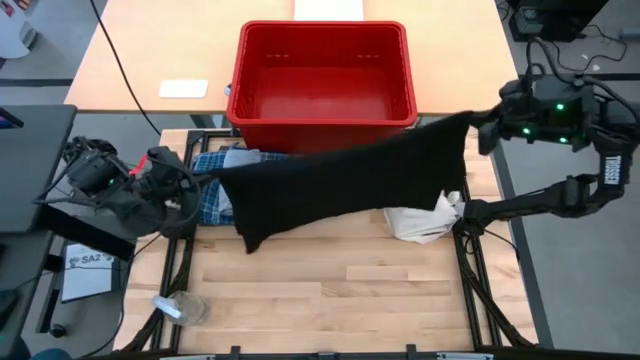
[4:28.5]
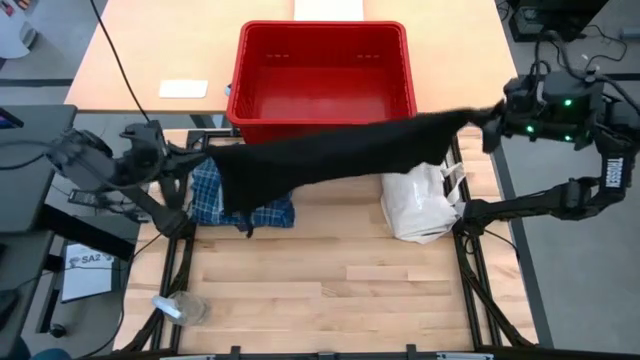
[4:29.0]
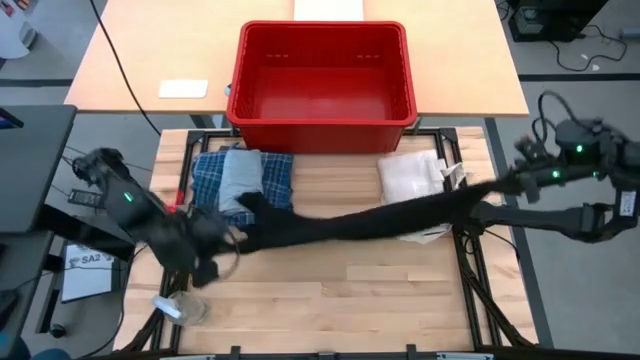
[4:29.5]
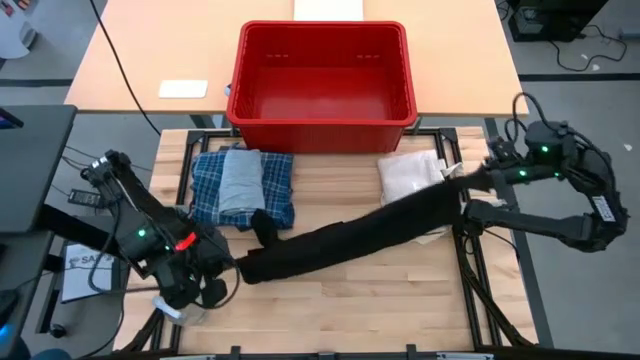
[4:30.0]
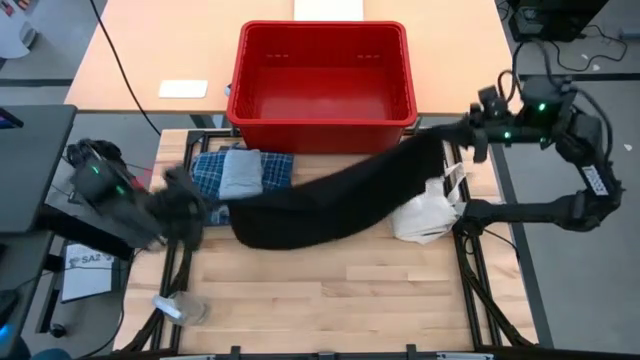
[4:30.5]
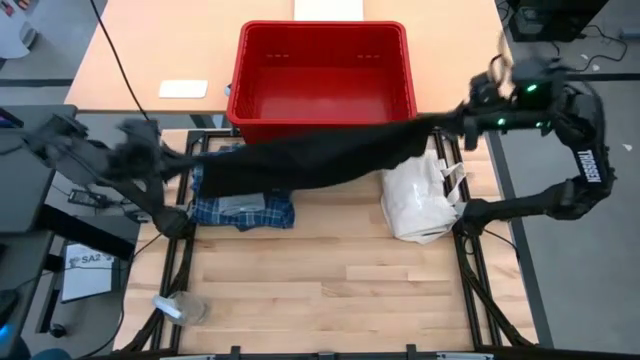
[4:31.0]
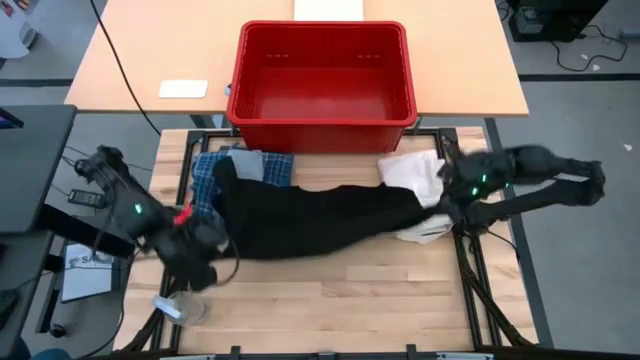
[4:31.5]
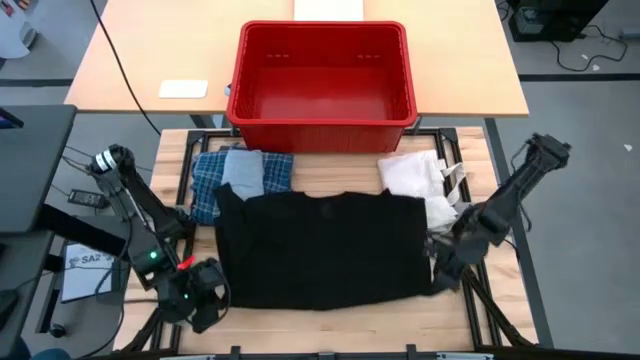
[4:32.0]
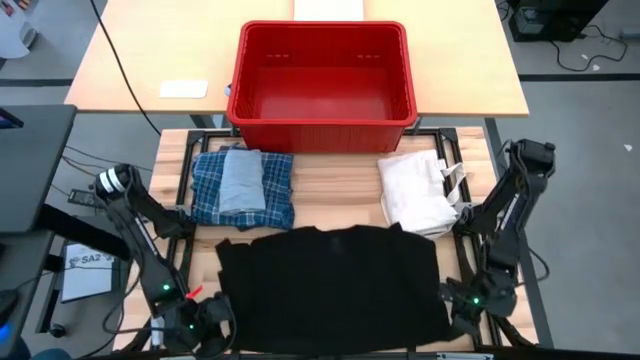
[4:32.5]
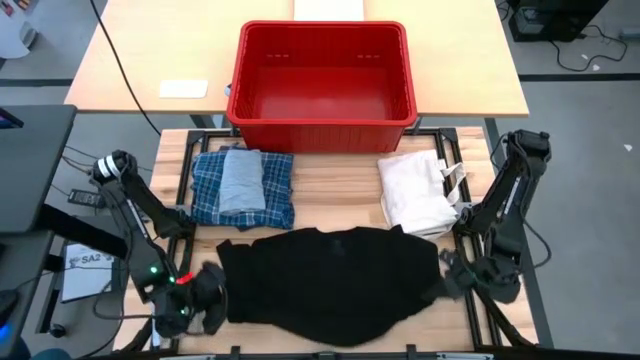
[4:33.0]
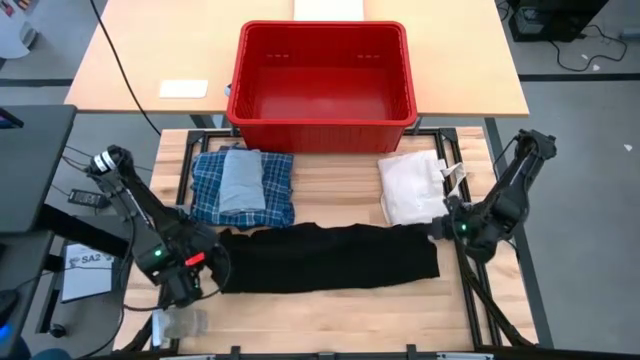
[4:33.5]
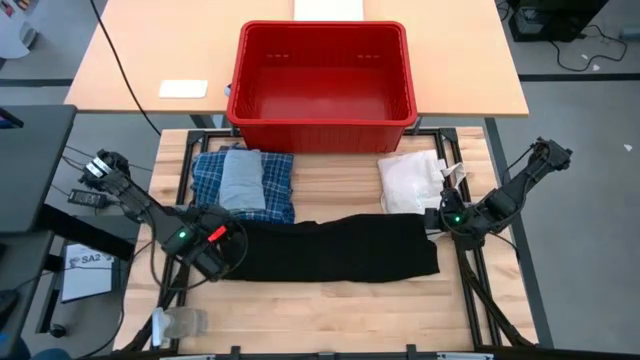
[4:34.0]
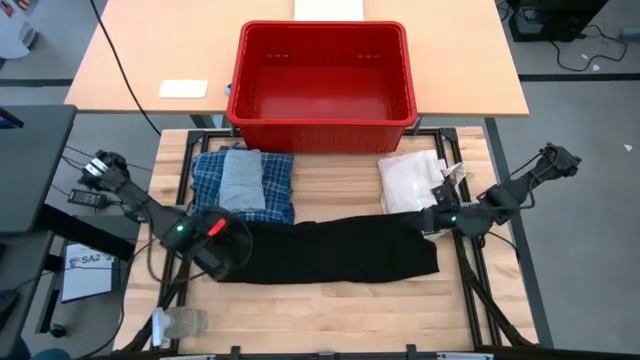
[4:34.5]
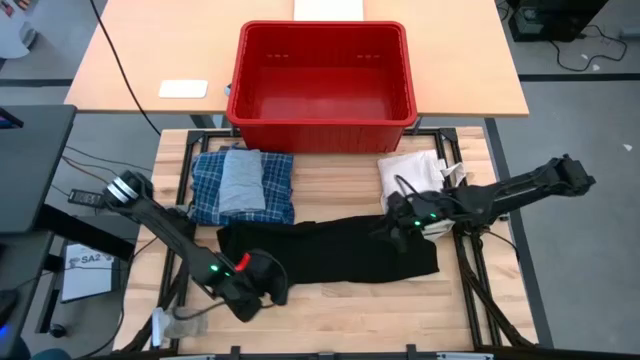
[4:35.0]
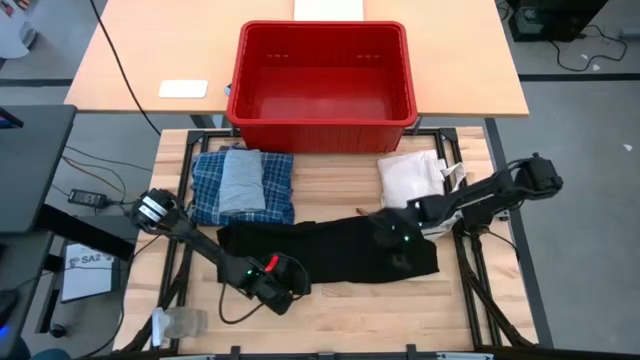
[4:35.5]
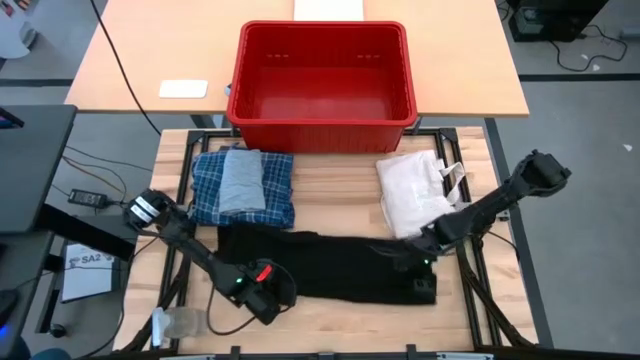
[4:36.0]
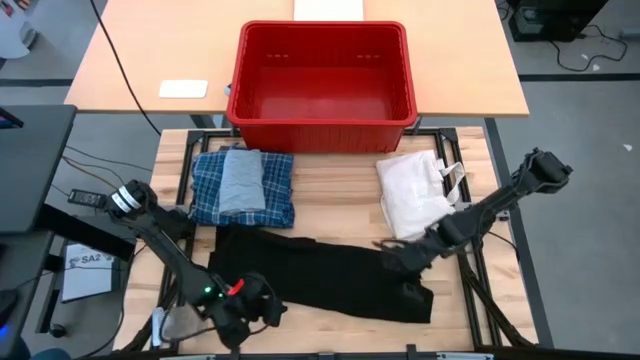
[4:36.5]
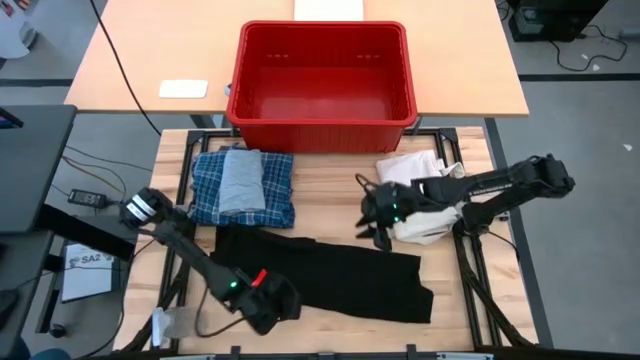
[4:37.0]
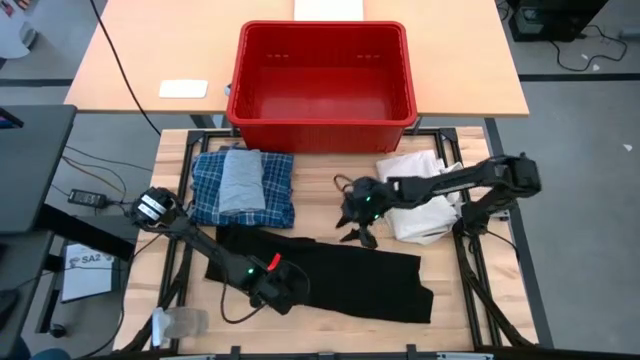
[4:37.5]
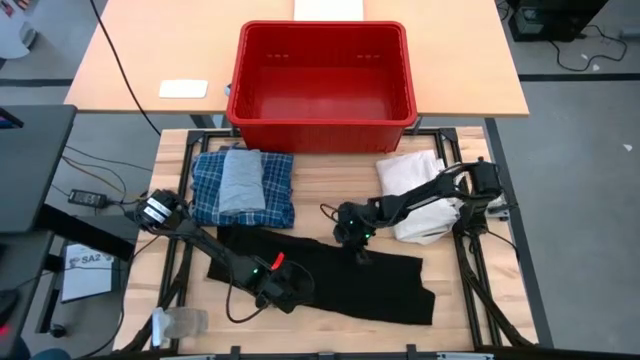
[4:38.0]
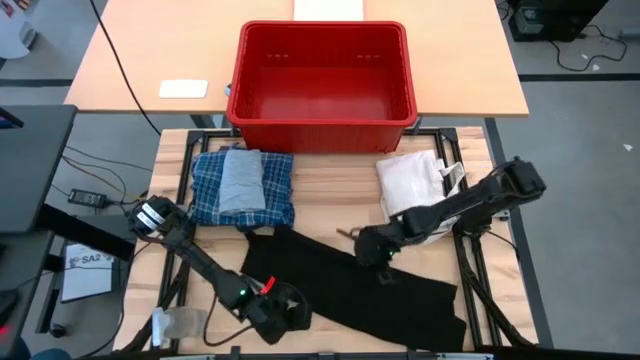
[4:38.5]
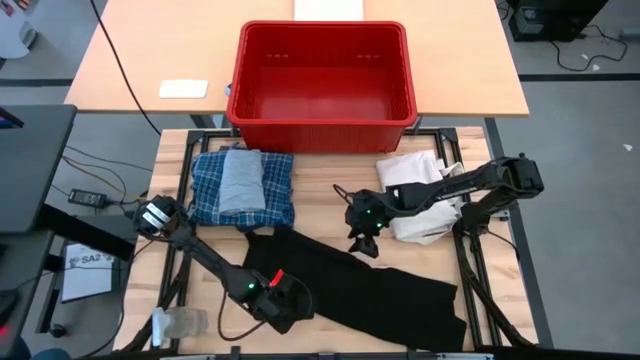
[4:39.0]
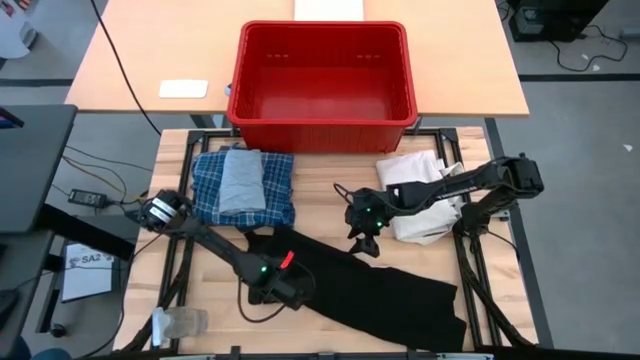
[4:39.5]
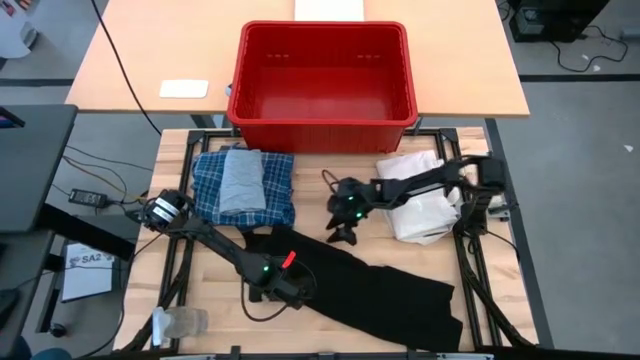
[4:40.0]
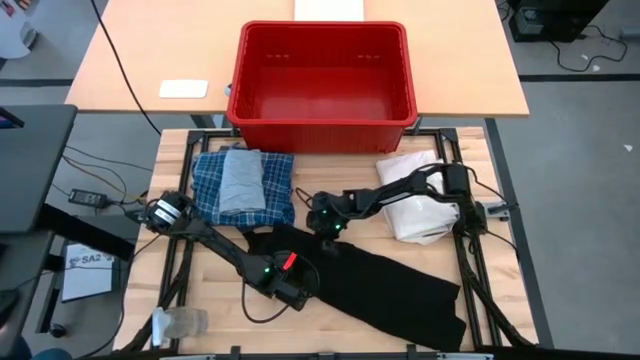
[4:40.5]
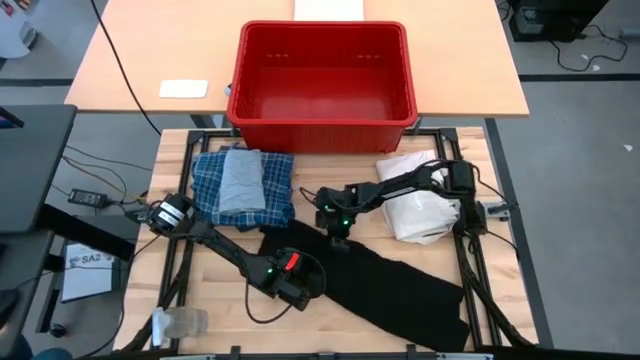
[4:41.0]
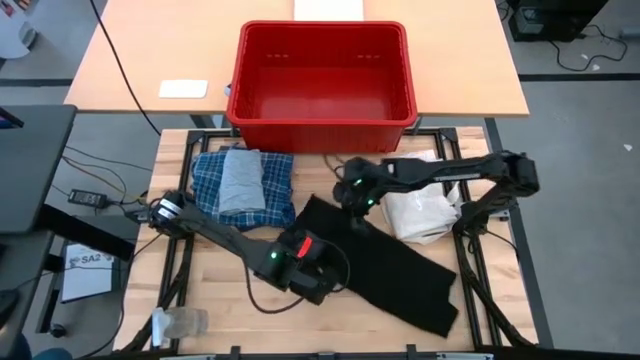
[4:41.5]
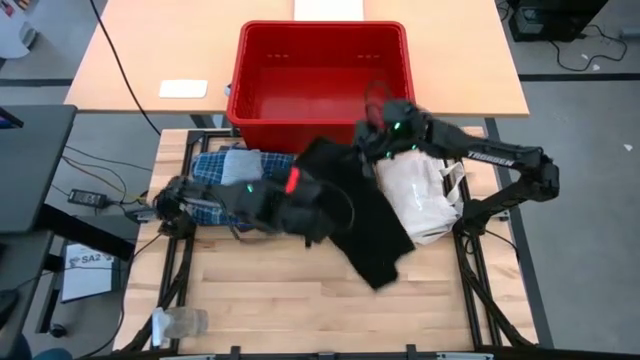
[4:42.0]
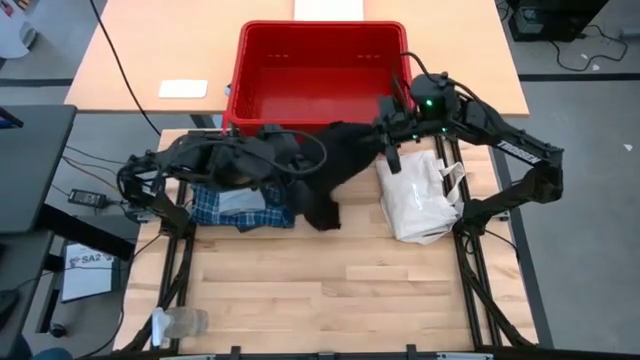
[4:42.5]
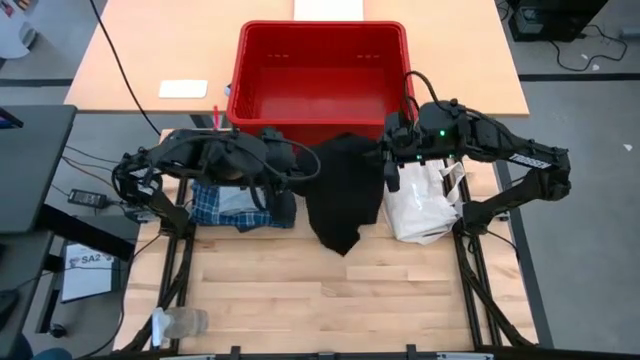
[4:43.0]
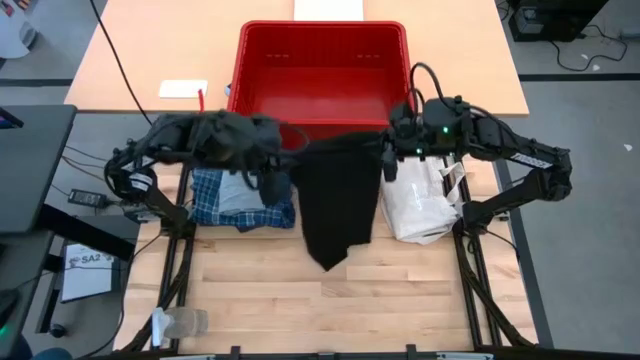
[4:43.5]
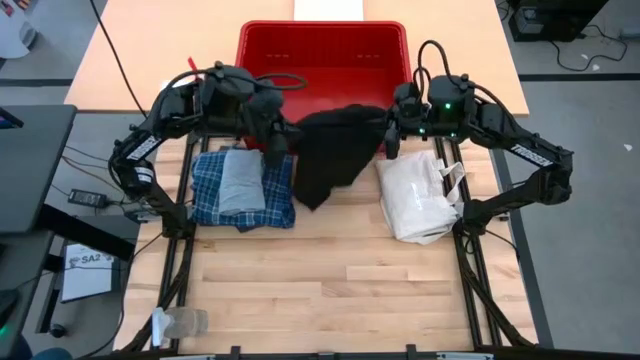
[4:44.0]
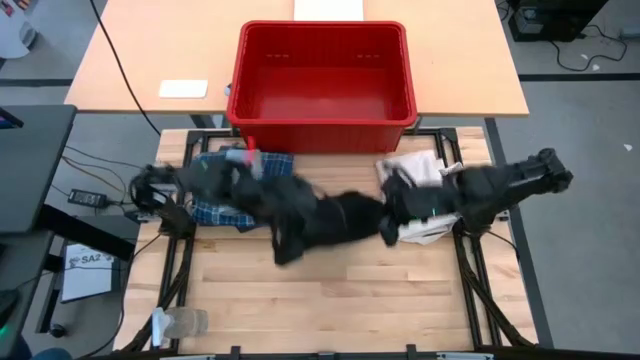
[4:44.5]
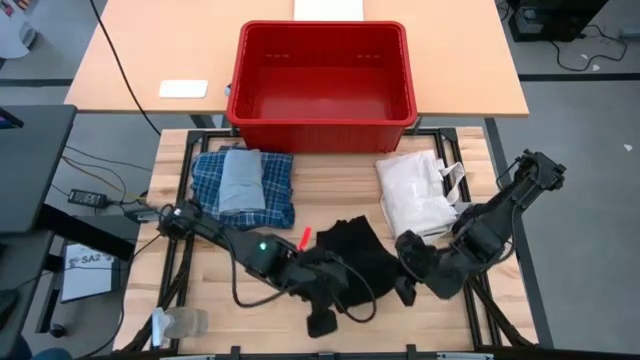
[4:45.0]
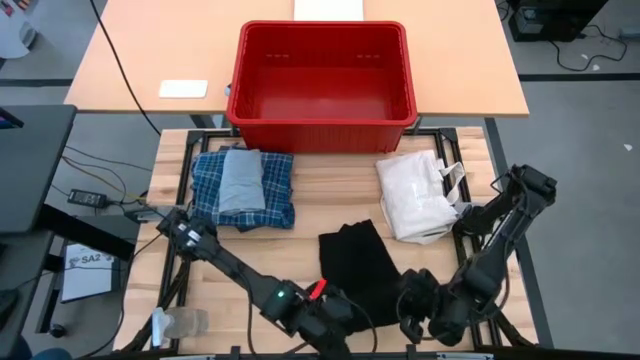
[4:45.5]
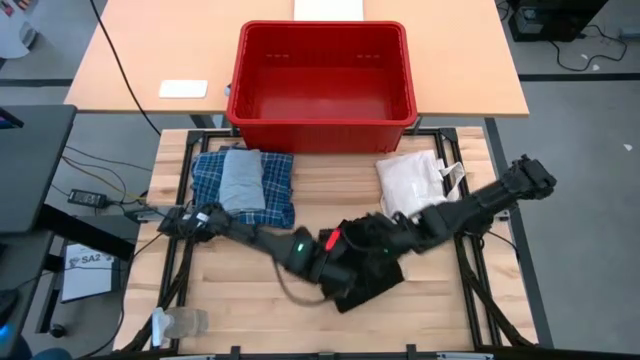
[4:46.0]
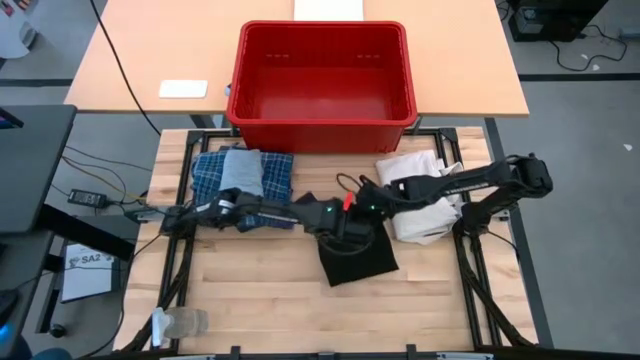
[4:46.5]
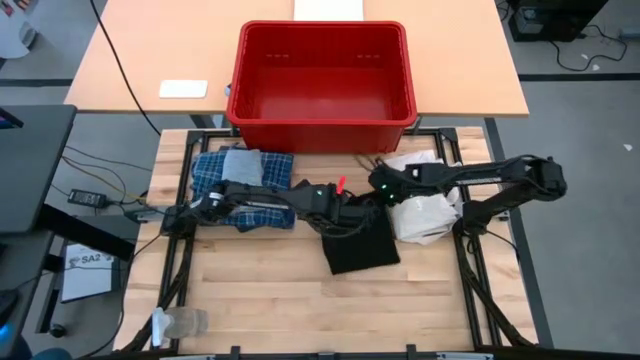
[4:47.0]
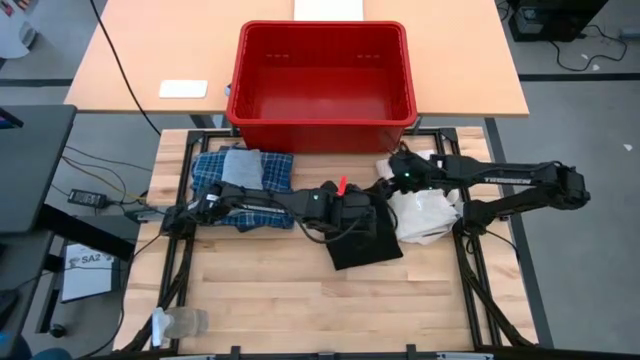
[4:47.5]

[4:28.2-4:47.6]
Task: Fold Laundry from Bin
Fold the black shirt

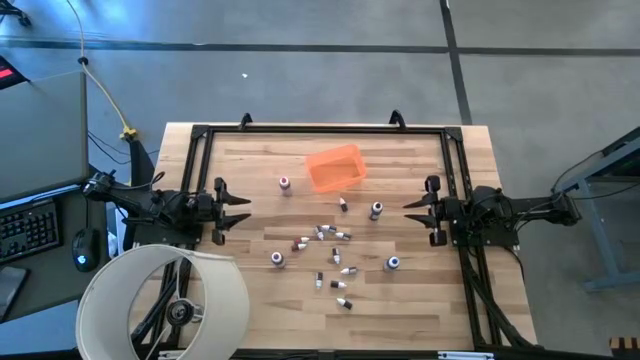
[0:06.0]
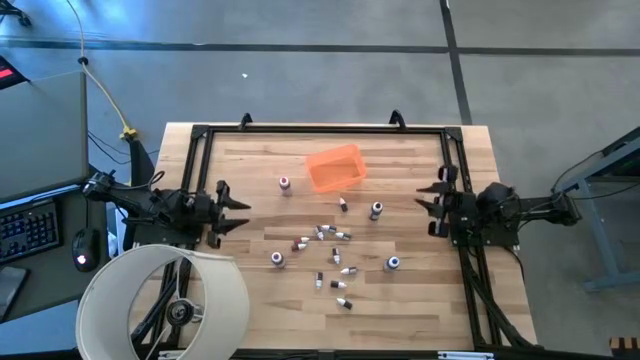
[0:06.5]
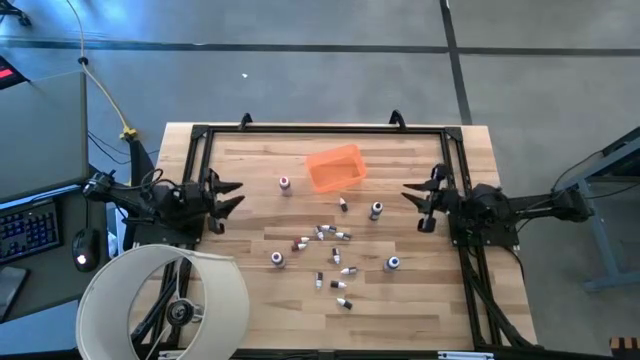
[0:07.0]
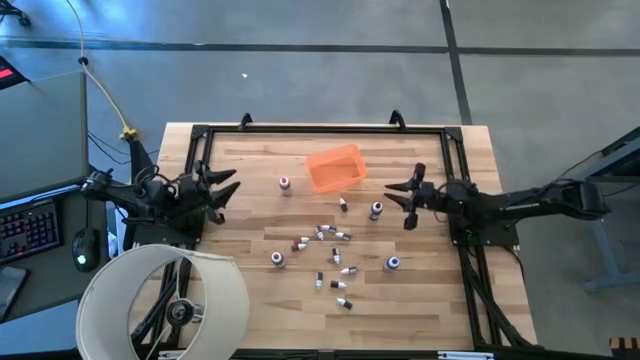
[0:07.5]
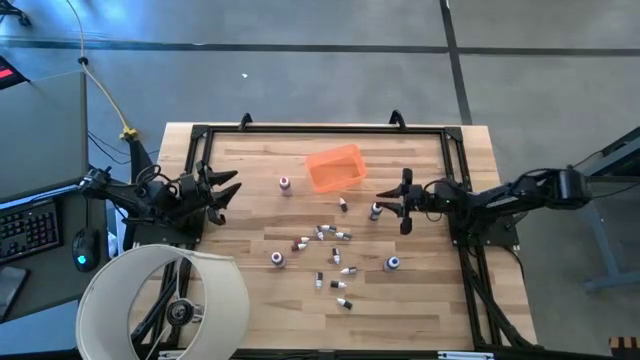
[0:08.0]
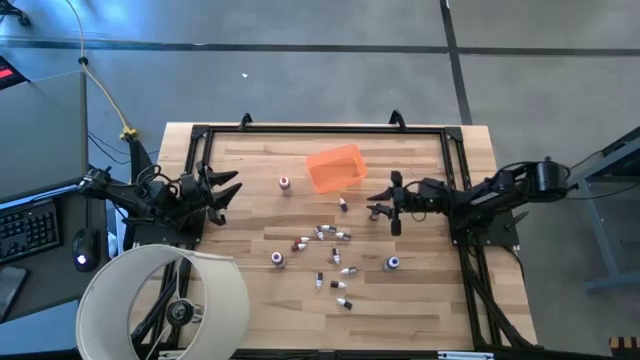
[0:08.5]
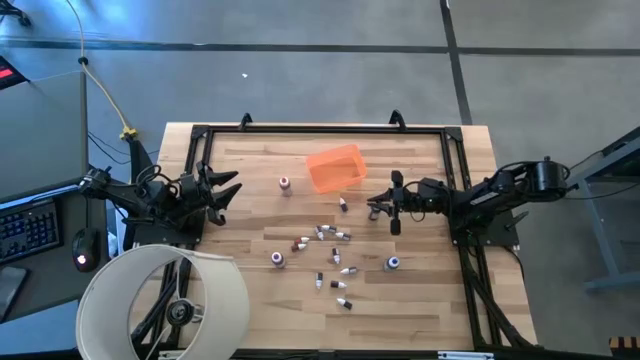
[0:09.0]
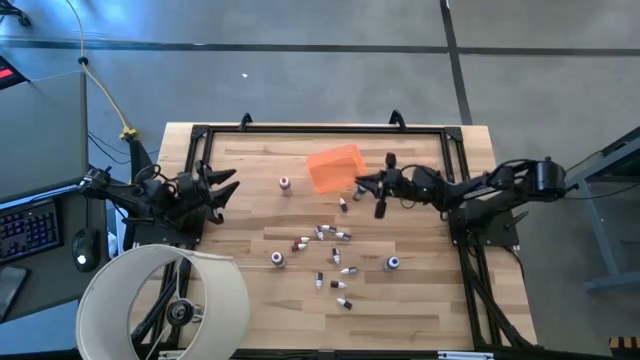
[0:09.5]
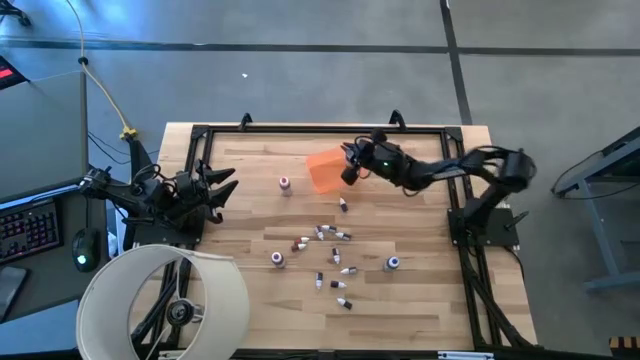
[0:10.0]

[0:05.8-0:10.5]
Task: Pick & Place food coloring
Put the big black food coloring bottle into the orange bin
